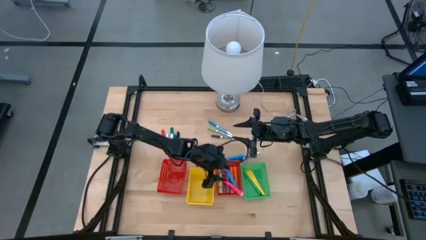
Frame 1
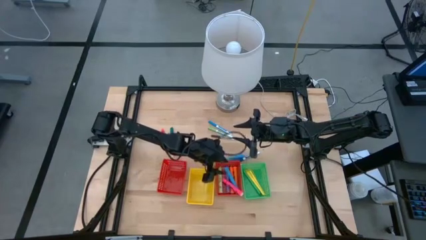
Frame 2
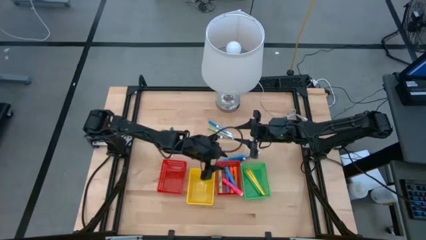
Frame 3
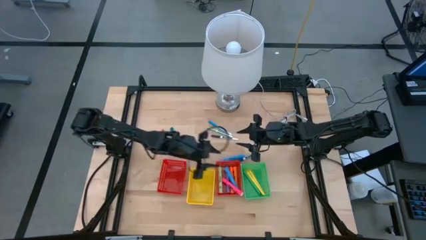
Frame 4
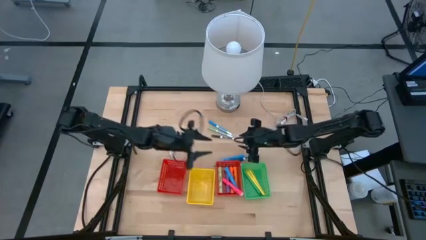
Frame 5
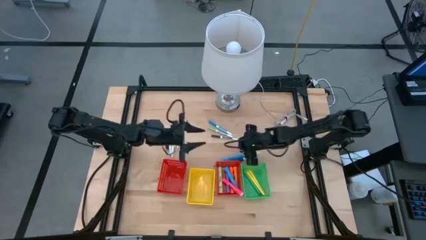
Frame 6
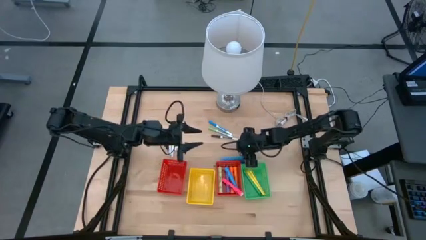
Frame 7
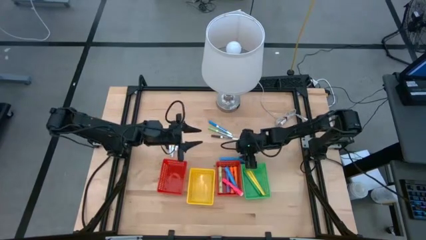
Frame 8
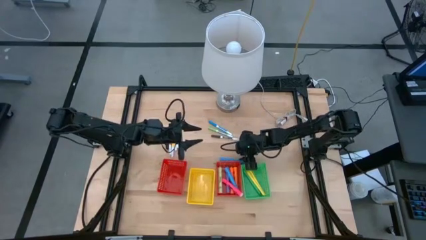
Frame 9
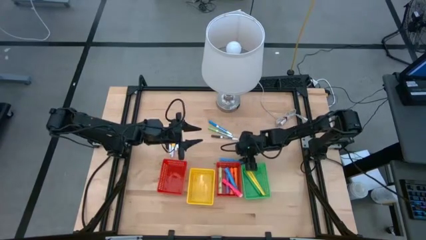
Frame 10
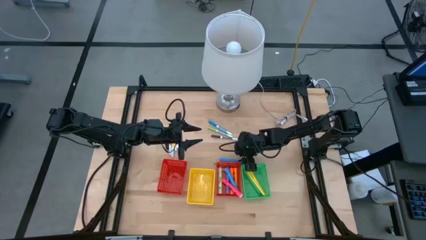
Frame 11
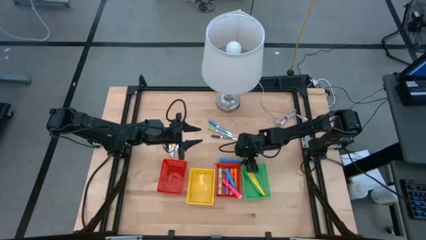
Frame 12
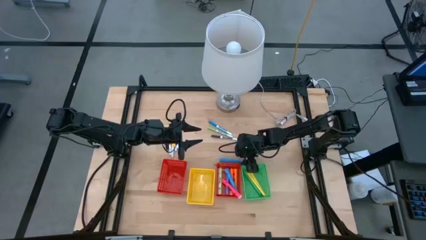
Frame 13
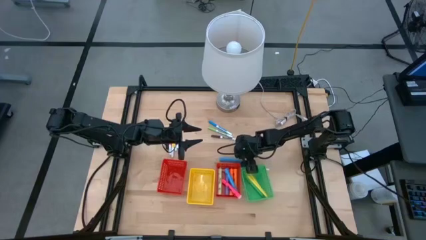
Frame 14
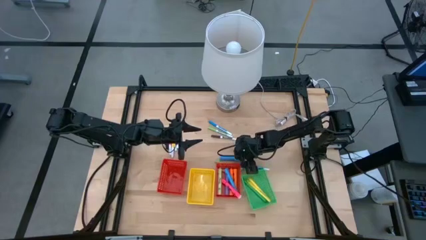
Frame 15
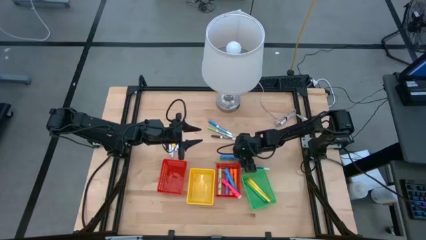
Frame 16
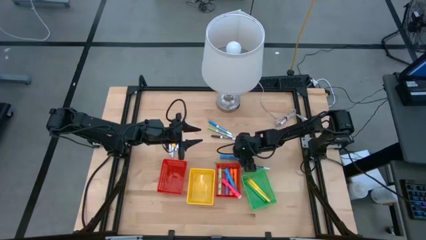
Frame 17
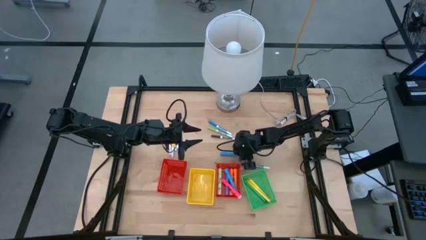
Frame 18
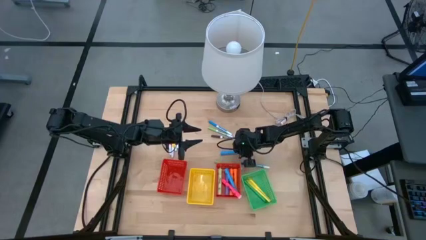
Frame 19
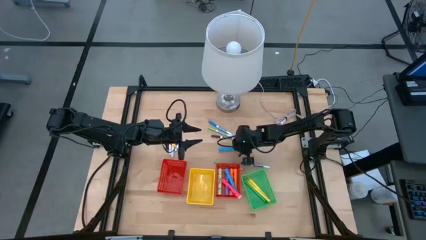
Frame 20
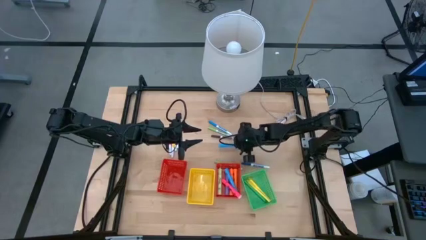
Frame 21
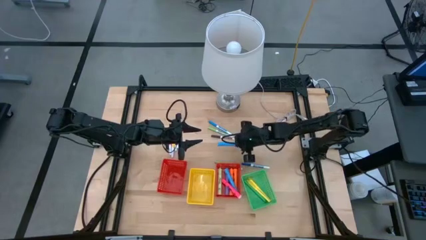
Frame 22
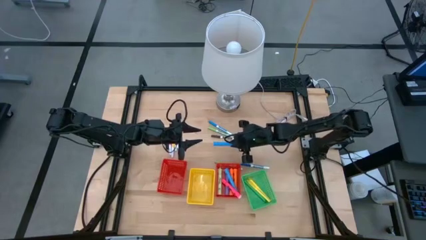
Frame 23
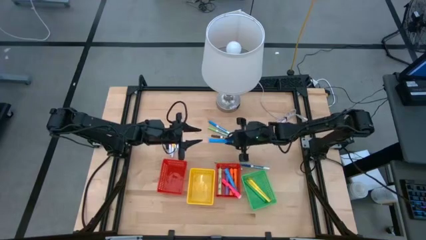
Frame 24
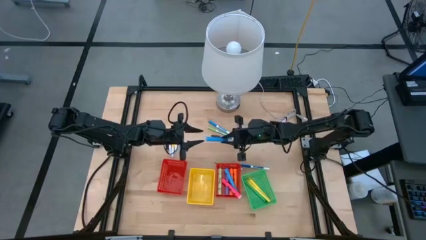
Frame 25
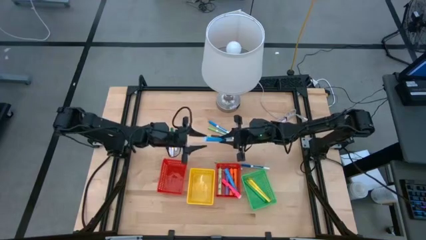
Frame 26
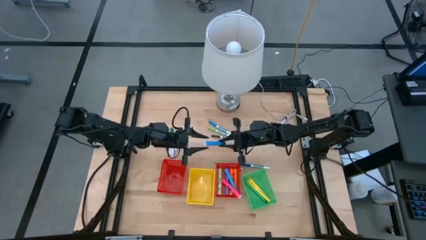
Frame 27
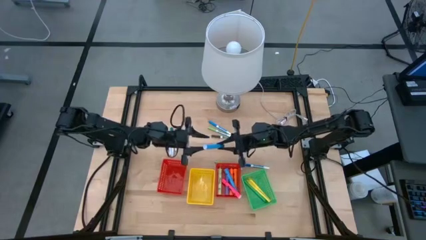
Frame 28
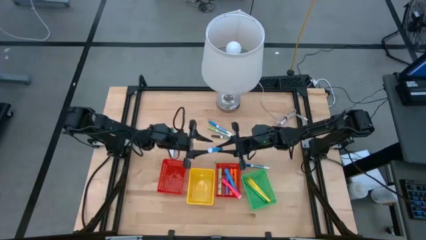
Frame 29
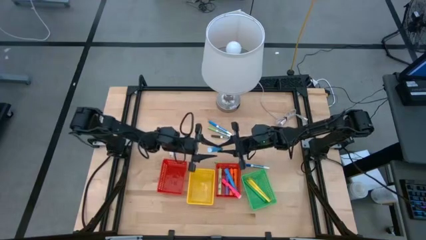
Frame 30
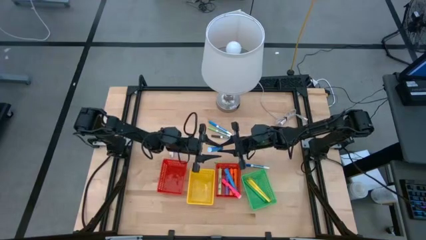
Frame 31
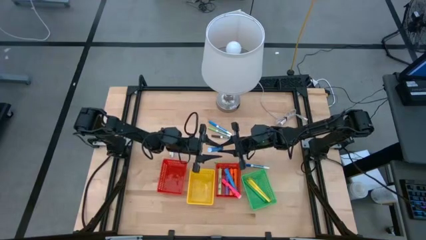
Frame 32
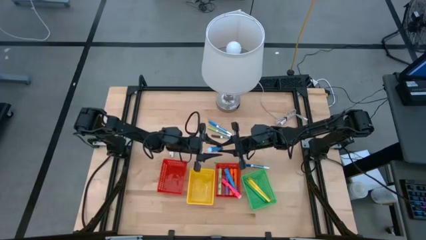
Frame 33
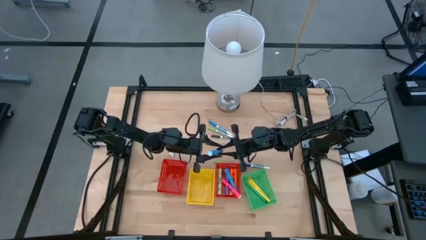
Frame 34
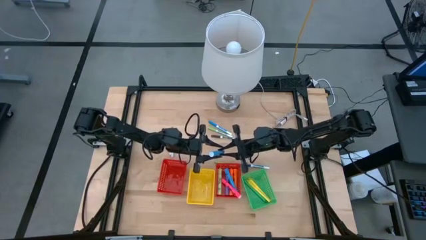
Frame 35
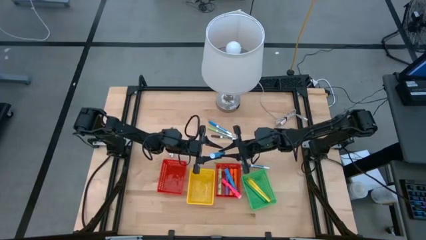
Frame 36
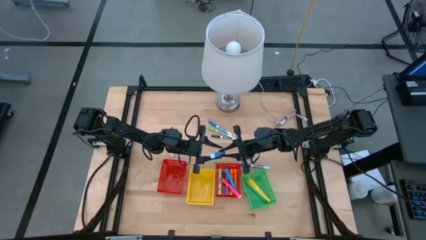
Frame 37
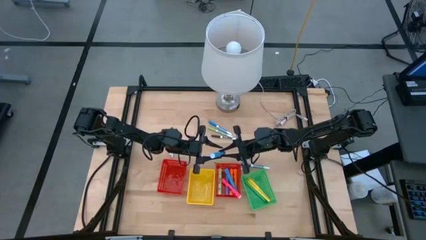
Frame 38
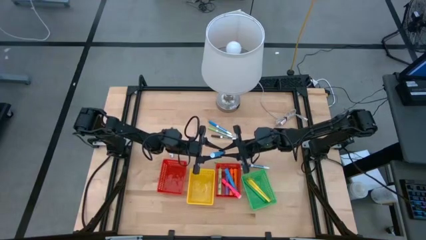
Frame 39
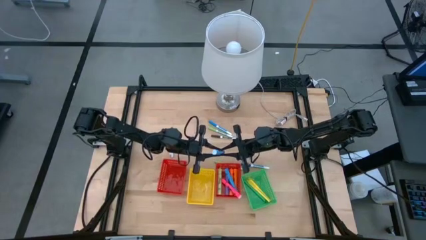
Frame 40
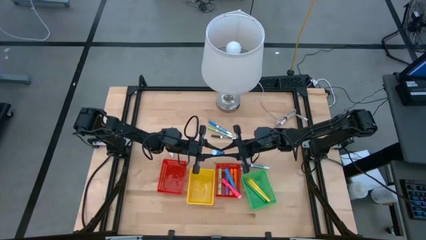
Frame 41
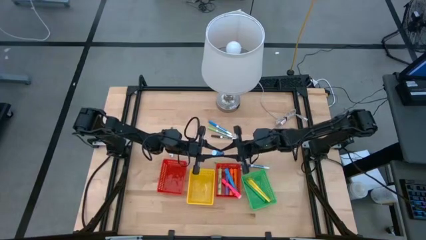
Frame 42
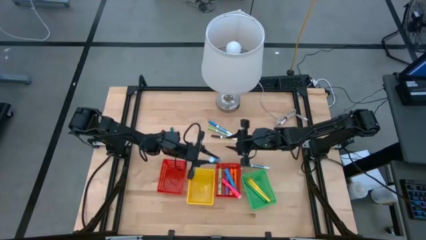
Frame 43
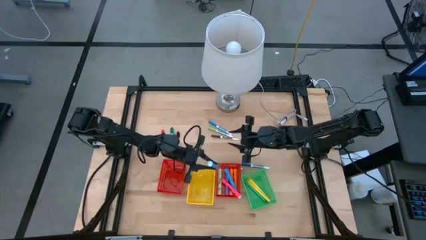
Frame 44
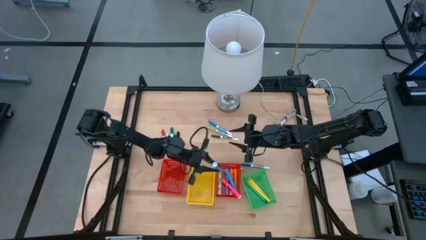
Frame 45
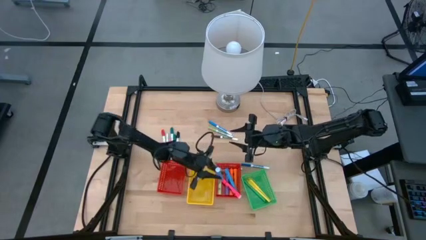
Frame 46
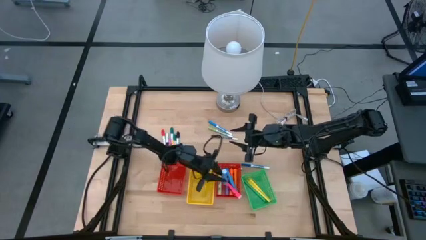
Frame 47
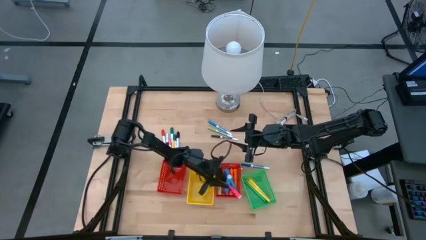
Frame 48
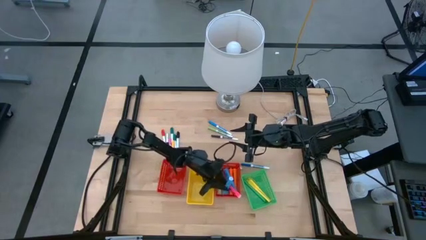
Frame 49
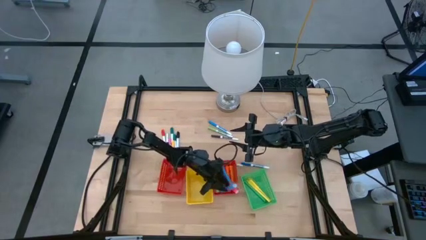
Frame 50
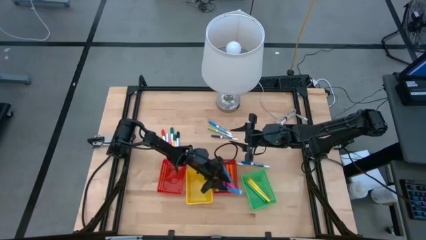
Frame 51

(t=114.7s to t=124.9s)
Task: Pick & Place Markers
Put the large blue highlighter into the right red bin
